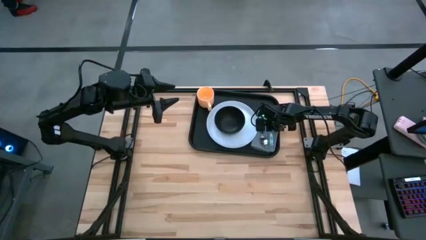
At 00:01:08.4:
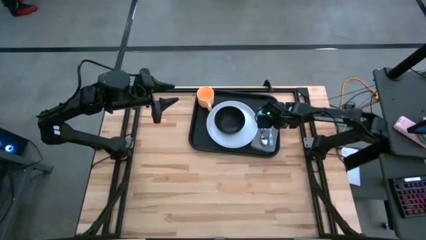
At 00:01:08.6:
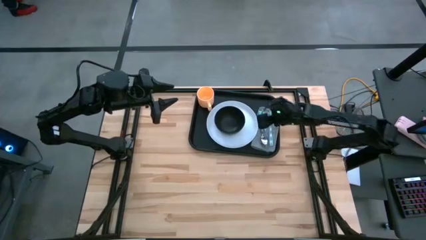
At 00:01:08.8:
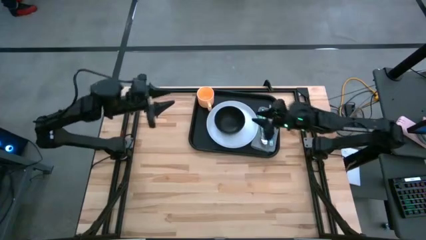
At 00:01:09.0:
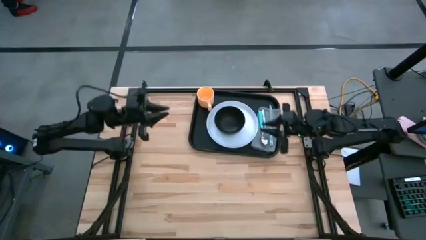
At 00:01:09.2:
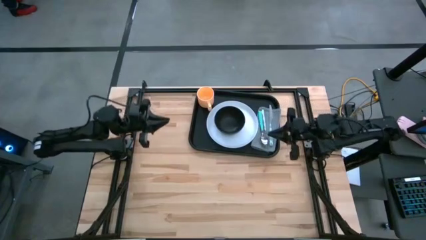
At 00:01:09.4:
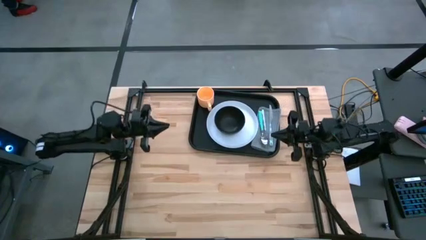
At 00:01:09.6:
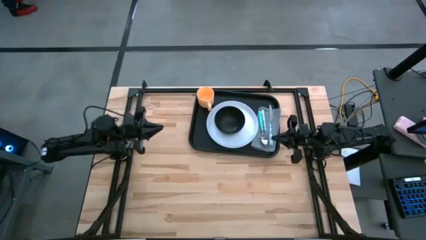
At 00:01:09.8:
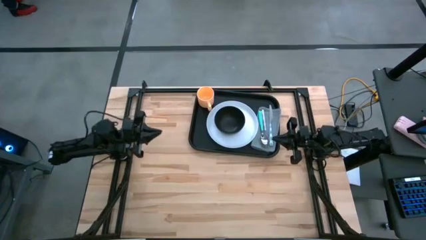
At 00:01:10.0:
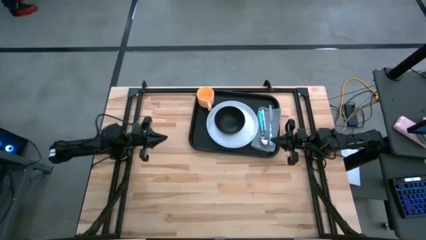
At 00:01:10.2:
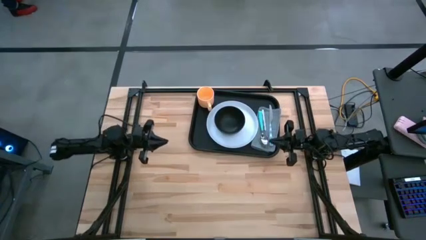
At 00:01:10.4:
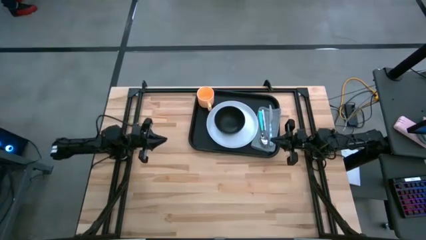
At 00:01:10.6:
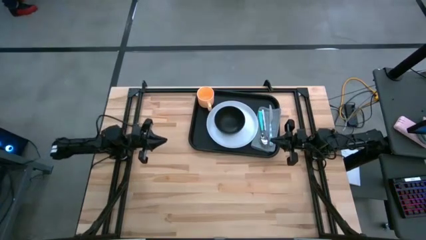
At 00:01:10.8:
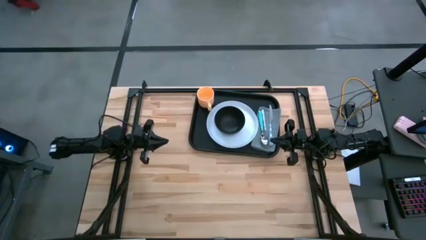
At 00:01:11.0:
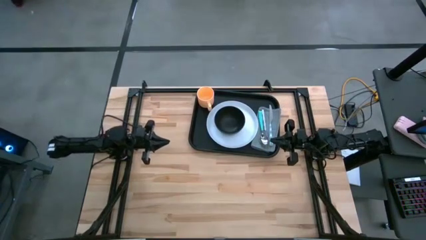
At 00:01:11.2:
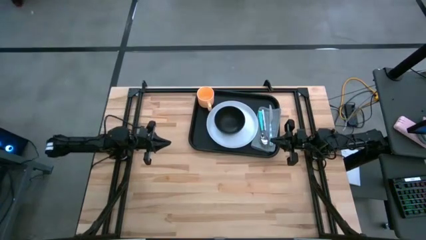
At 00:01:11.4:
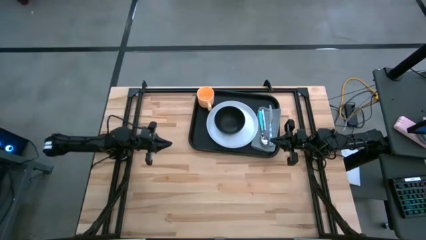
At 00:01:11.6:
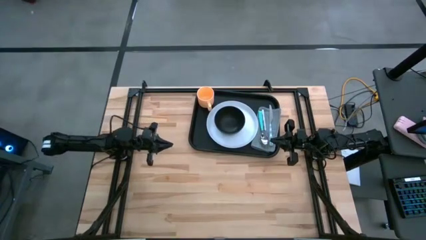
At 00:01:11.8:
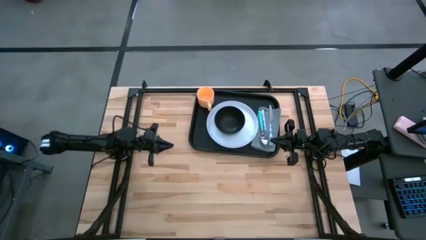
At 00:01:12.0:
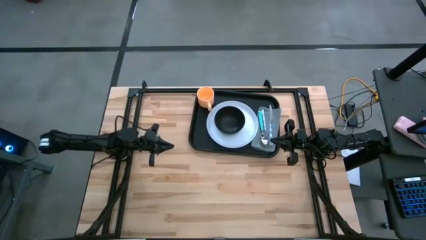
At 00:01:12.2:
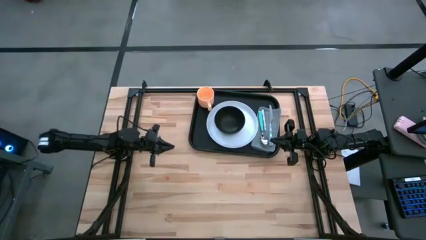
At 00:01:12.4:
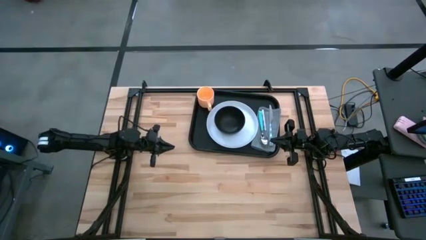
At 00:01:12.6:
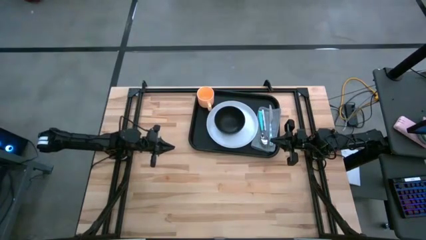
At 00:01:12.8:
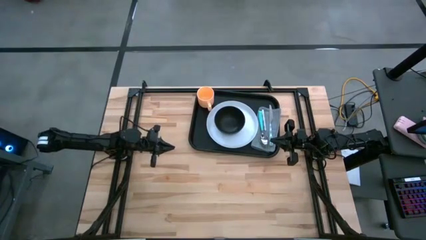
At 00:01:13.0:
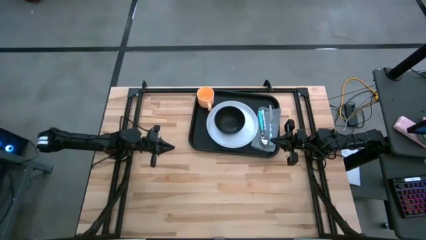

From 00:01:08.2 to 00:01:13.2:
Task: Set up tray
Return to Home Position

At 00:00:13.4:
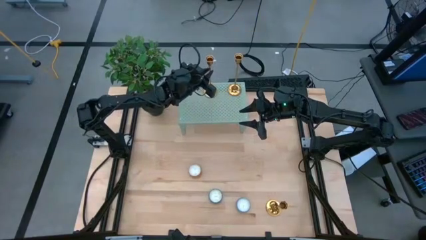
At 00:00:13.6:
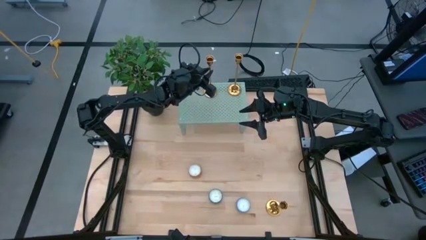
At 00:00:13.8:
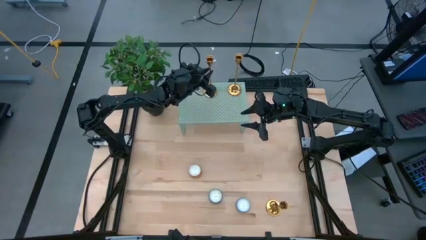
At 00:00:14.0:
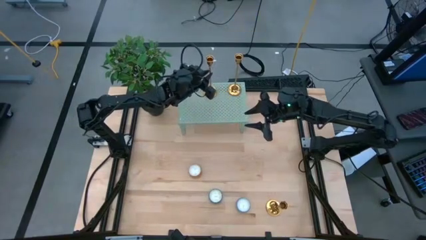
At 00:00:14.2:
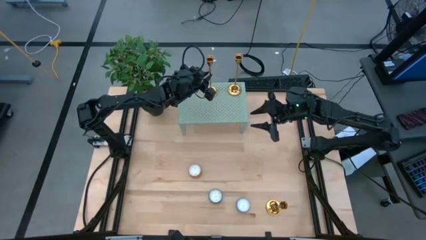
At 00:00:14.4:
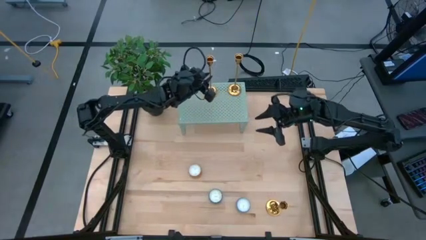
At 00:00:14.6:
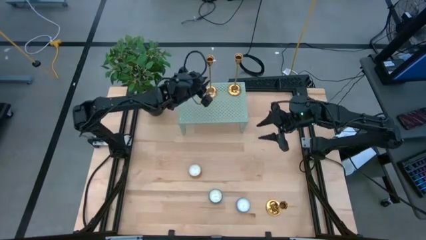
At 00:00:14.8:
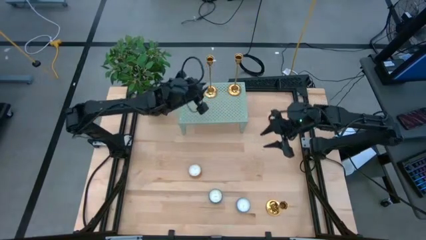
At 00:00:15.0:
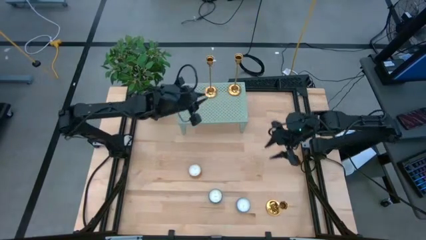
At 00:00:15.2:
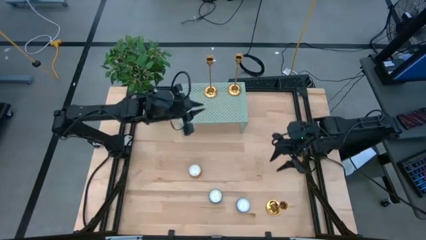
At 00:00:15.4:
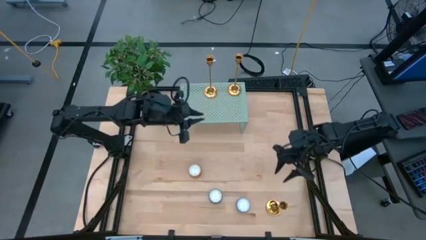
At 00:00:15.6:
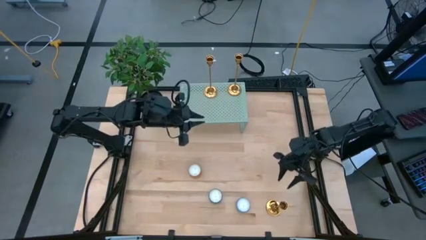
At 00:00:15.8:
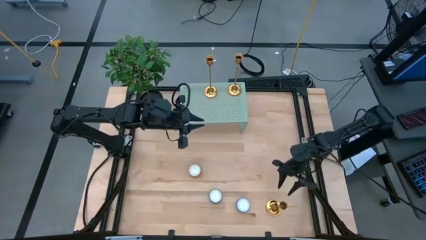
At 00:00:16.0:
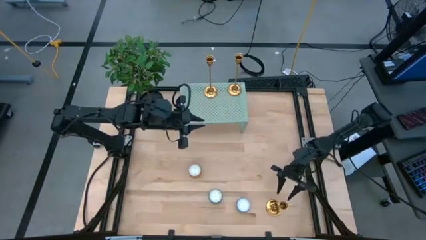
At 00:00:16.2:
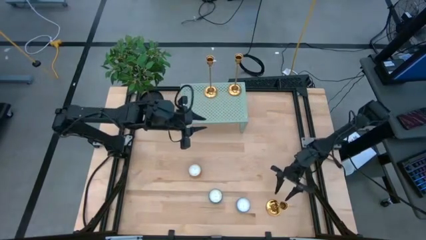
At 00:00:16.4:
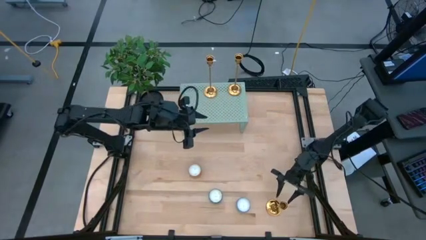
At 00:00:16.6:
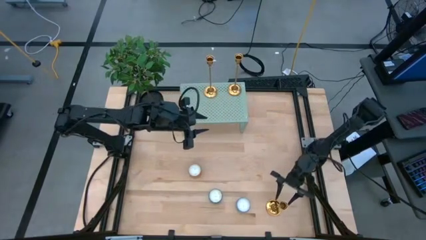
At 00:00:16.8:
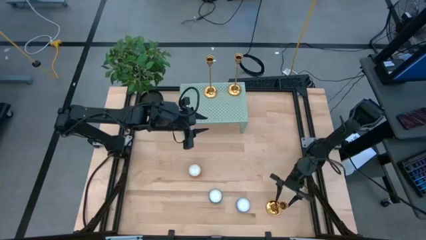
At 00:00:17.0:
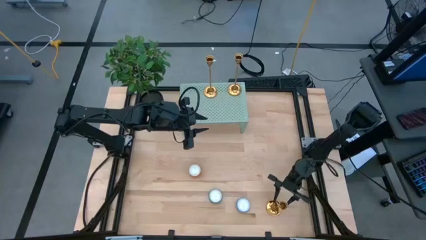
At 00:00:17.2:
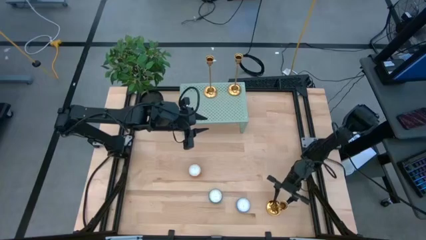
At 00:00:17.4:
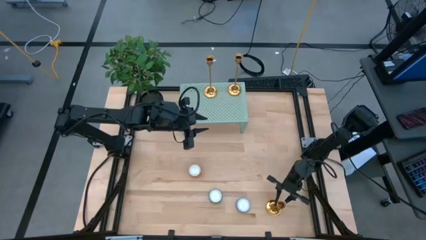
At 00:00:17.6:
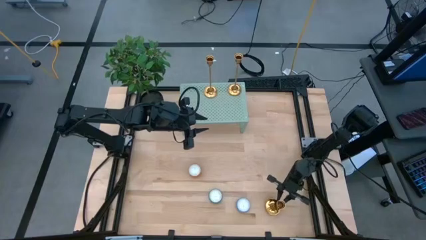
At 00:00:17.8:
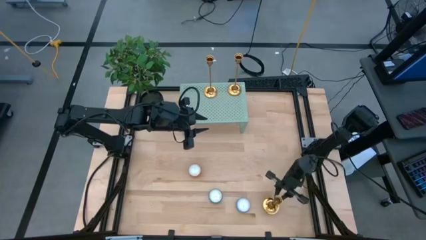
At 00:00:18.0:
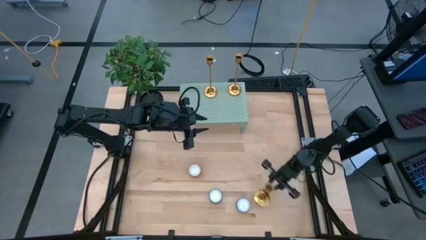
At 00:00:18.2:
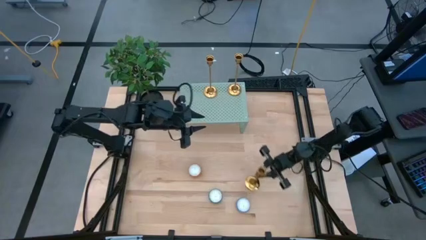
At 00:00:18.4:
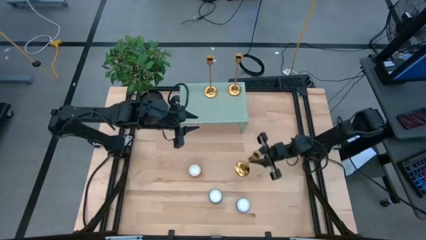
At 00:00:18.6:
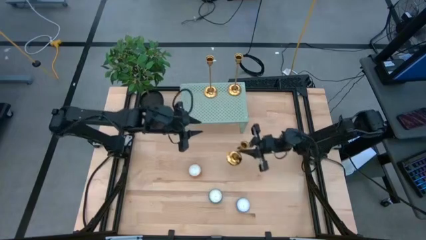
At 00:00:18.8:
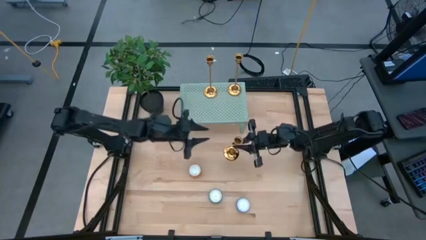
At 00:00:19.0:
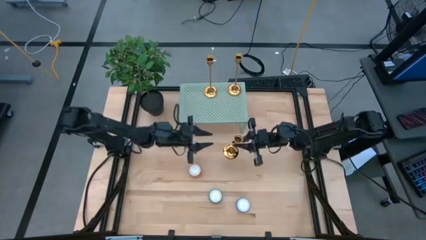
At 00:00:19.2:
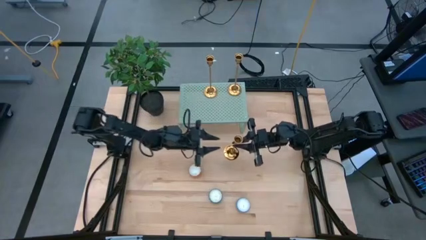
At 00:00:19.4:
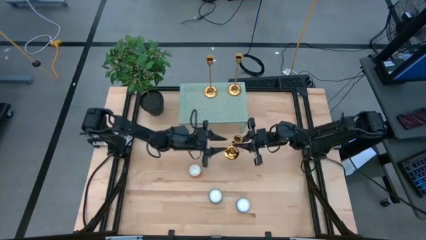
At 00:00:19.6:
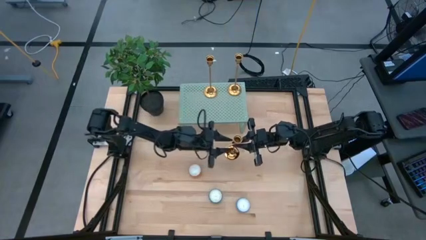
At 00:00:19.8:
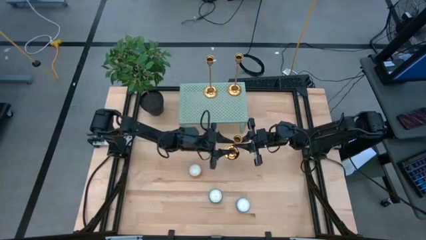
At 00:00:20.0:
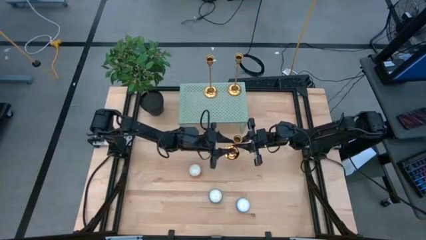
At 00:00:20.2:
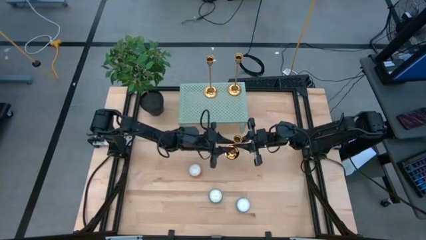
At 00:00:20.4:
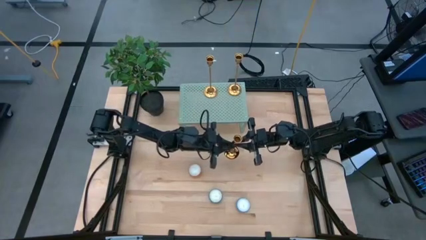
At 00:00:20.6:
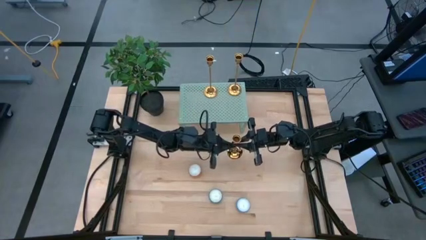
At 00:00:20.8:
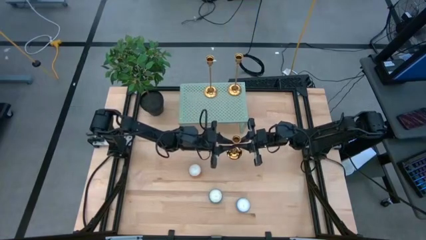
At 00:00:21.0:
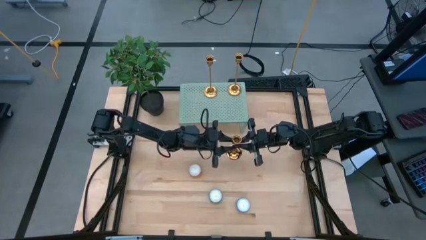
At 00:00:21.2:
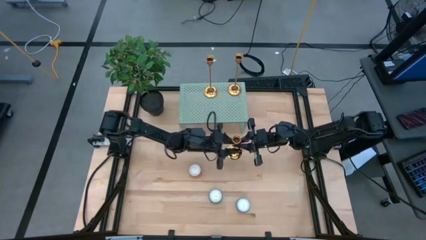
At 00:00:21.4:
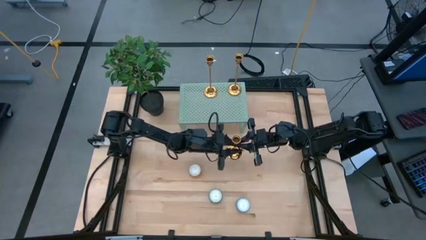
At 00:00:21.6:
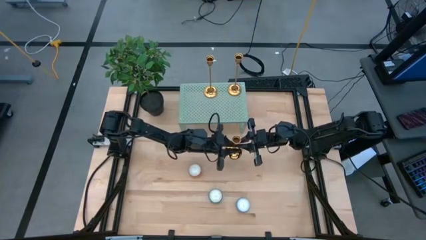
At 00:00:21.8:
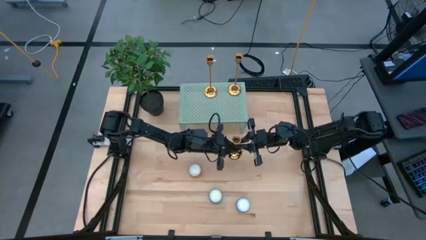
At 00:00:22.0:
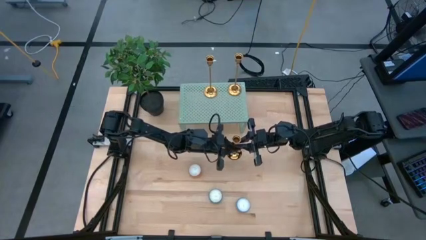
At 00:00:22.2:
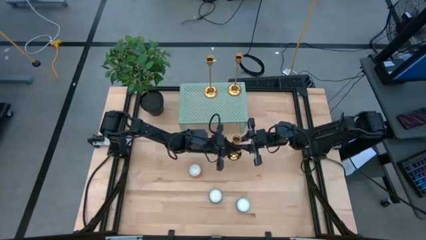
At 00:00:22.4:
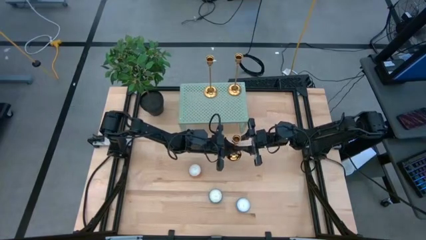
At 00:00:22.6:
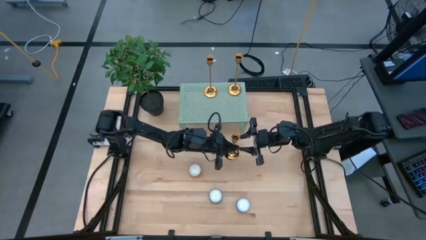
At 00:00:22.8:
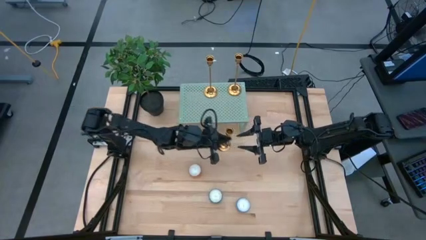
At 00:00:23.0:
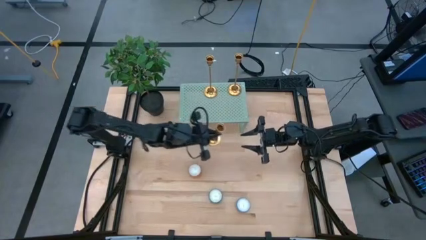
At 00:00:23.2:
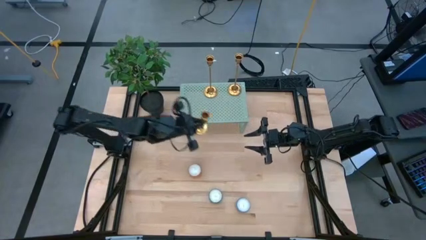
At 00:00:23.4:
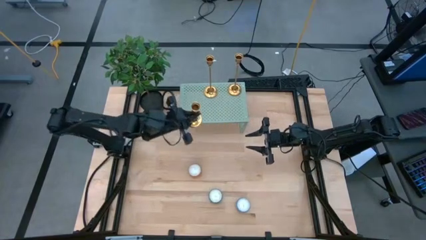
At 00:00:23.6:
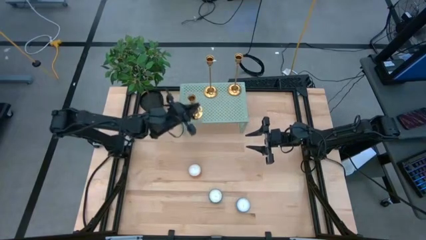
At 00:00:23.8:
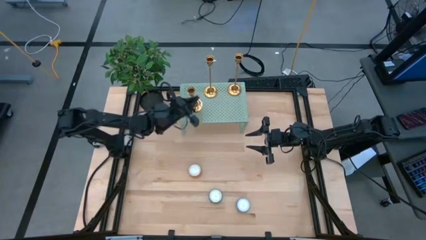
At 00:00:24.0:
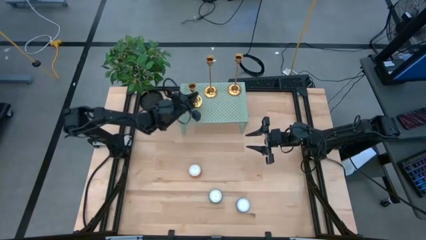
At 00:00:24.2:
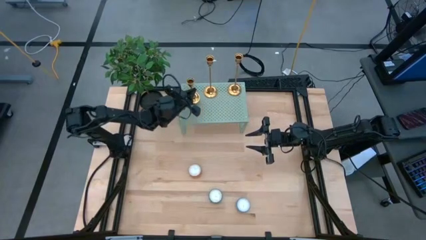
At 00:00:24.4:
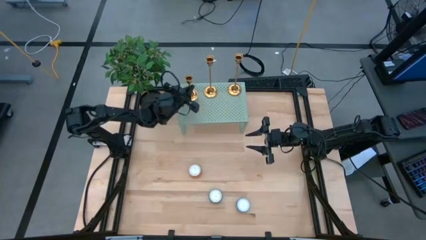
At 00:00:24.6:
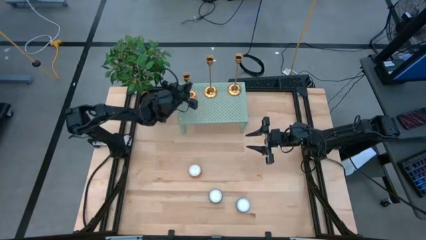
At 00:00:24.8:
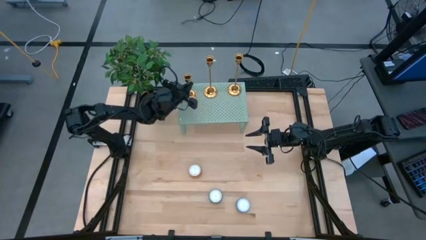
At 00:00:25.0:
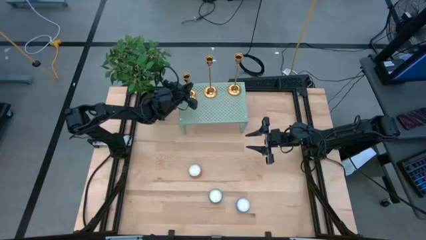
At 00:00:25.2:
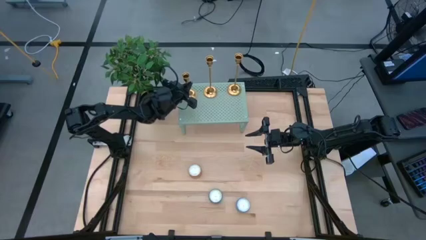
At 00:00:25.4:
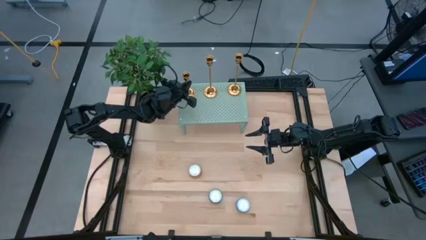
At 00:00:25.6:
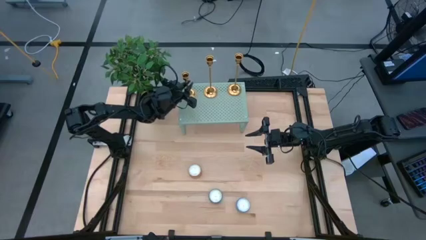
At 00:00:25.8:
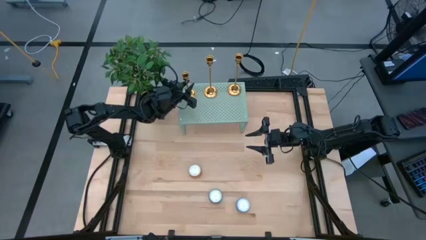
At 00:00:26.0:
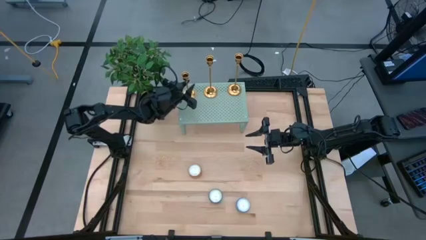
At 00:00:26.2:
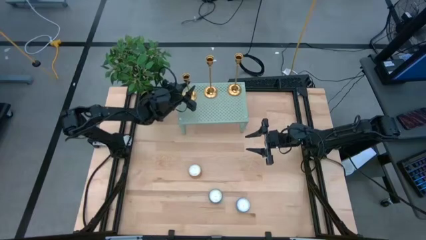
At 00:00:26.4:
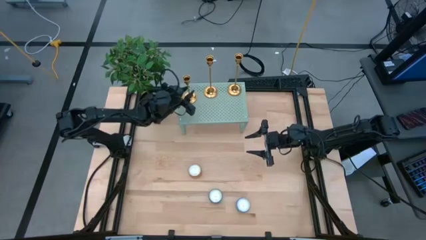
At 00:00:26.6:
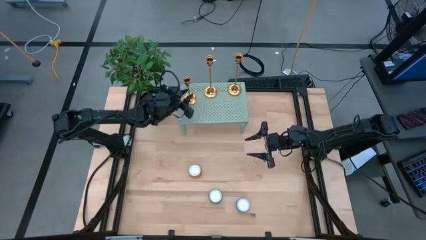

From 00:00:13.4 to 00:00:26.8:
Task: Pick & Place candle stick holders
Put the gold candle holder on the shelf
